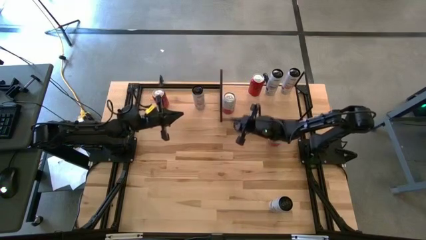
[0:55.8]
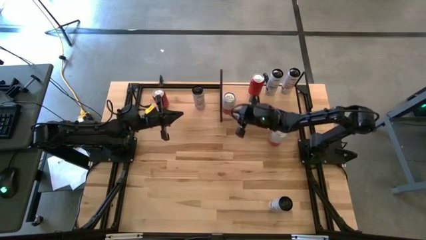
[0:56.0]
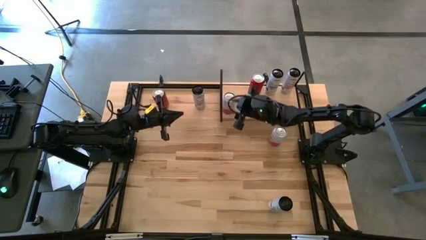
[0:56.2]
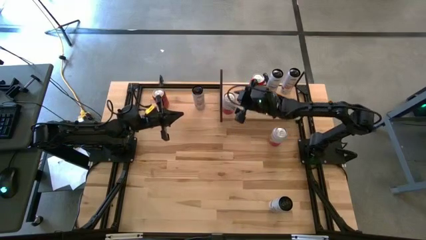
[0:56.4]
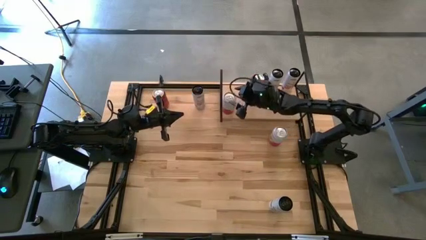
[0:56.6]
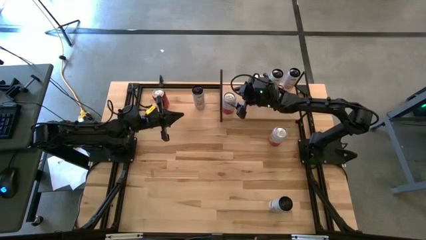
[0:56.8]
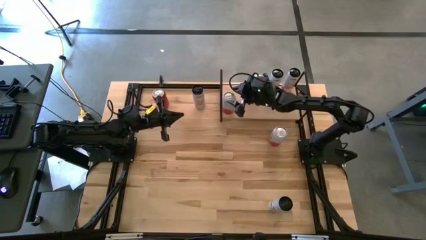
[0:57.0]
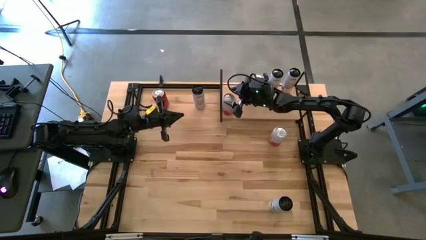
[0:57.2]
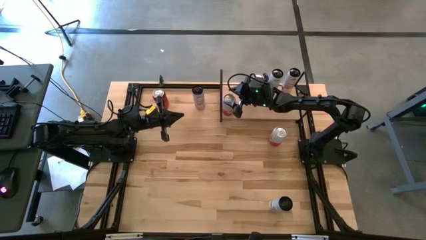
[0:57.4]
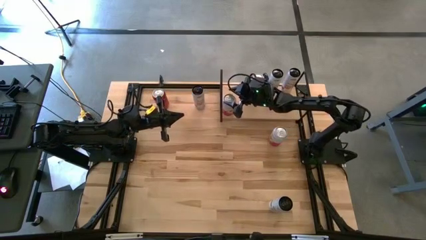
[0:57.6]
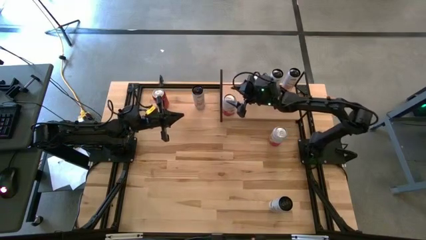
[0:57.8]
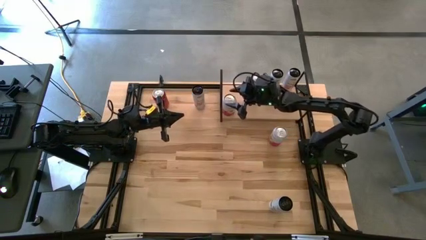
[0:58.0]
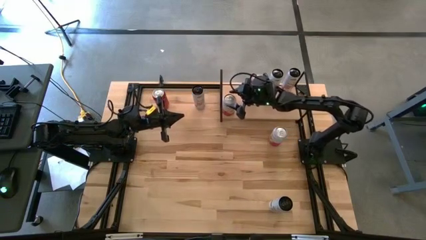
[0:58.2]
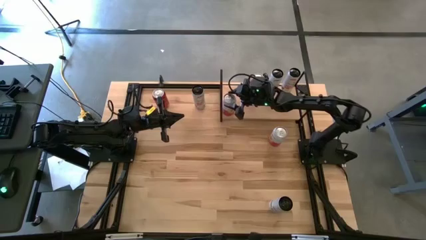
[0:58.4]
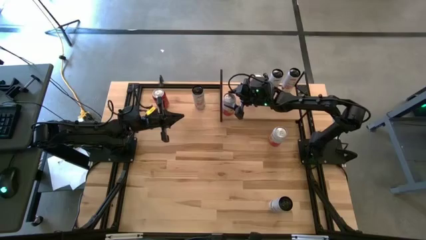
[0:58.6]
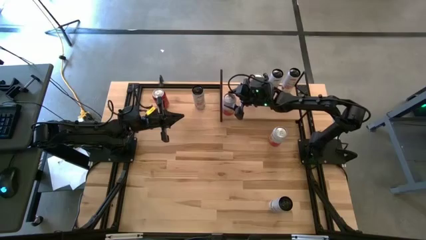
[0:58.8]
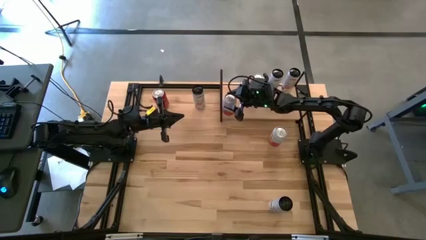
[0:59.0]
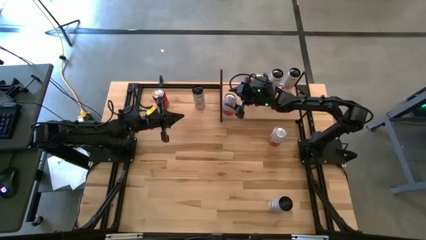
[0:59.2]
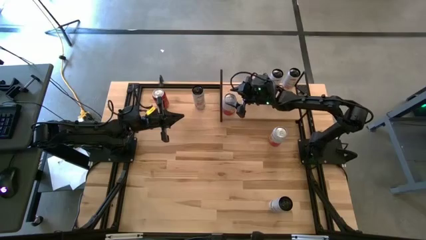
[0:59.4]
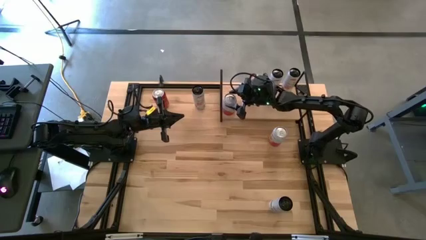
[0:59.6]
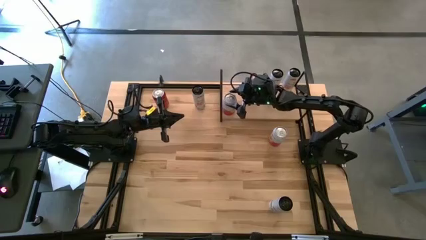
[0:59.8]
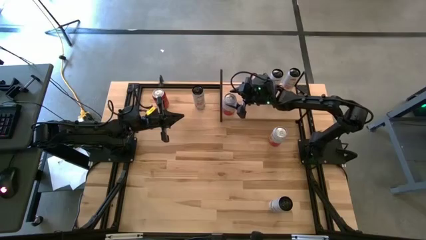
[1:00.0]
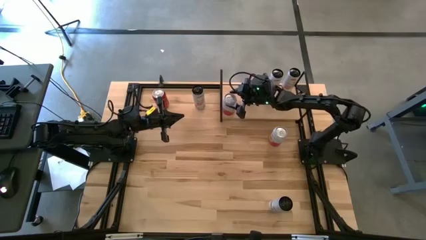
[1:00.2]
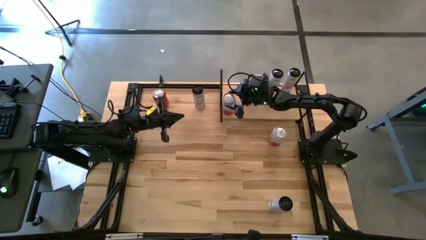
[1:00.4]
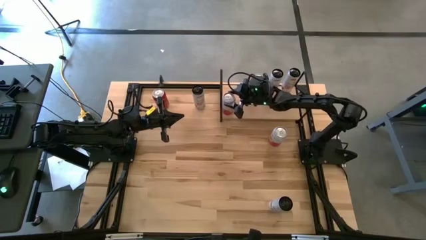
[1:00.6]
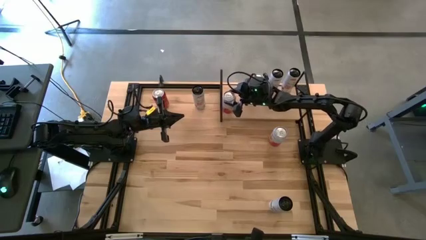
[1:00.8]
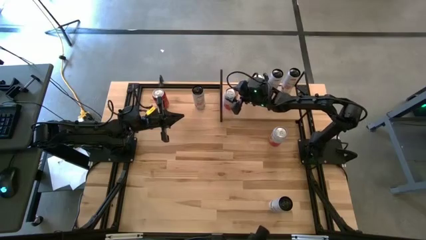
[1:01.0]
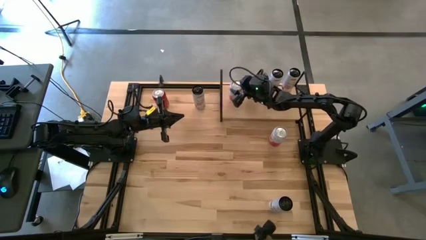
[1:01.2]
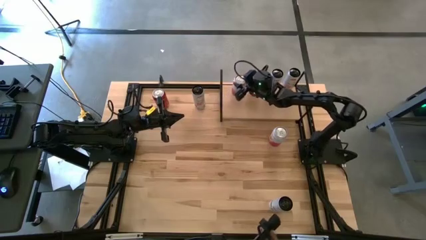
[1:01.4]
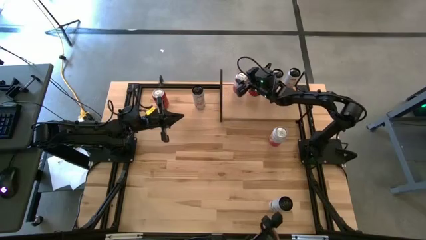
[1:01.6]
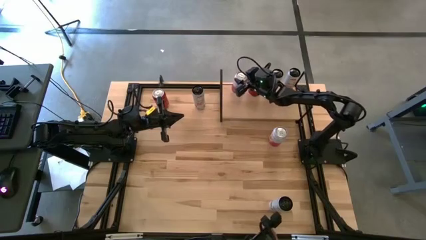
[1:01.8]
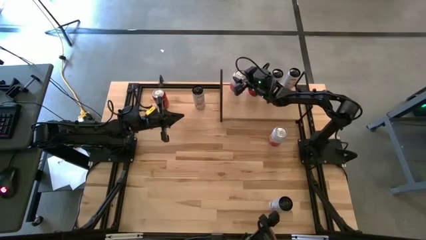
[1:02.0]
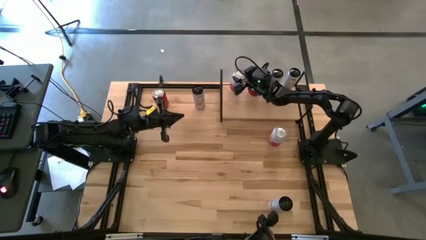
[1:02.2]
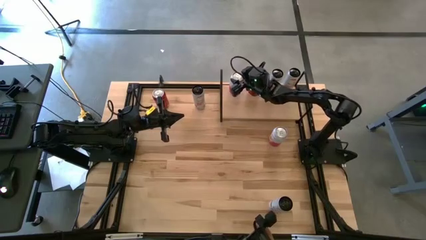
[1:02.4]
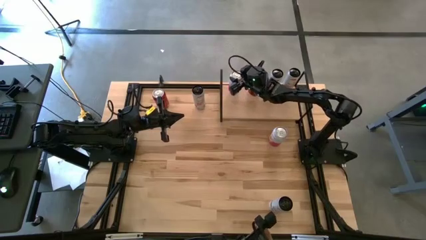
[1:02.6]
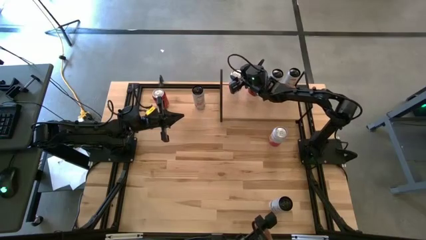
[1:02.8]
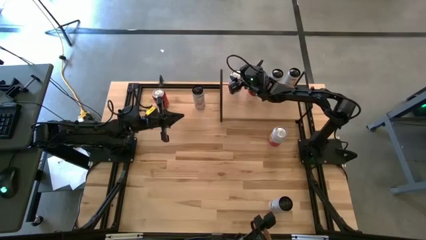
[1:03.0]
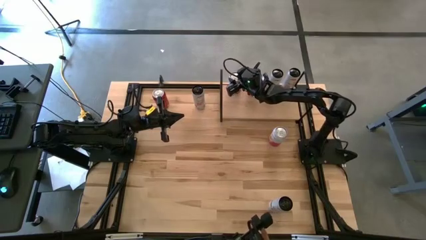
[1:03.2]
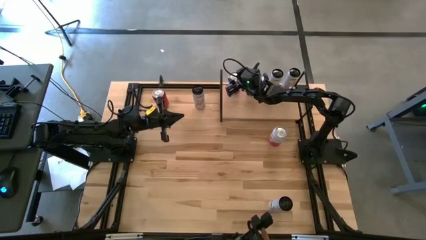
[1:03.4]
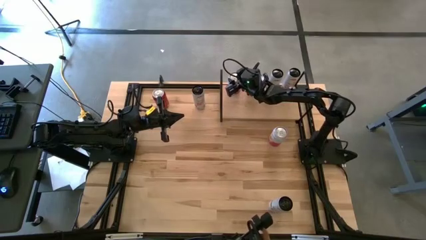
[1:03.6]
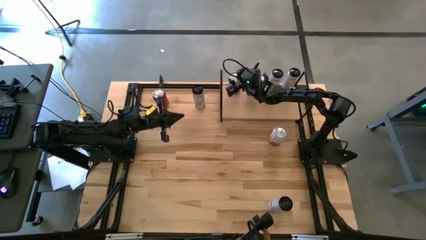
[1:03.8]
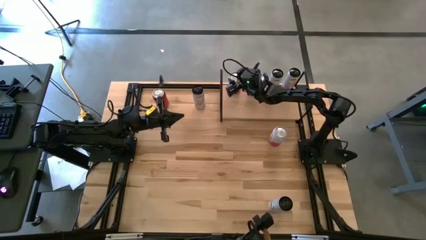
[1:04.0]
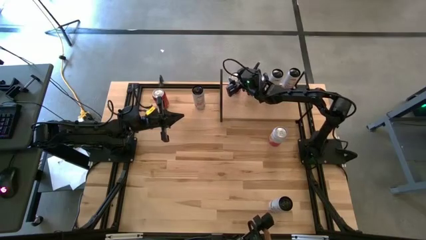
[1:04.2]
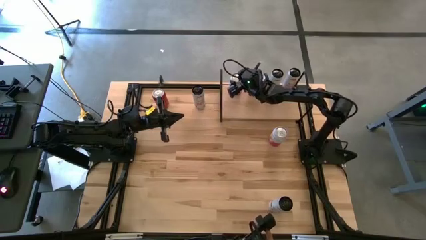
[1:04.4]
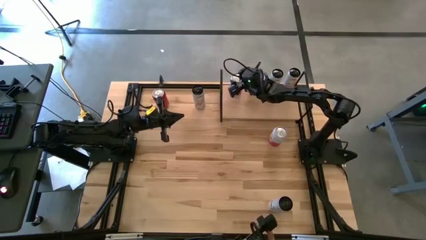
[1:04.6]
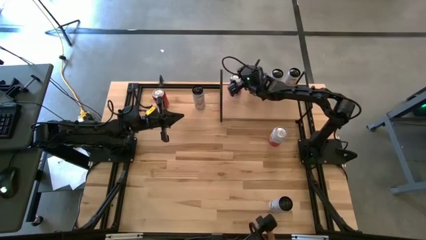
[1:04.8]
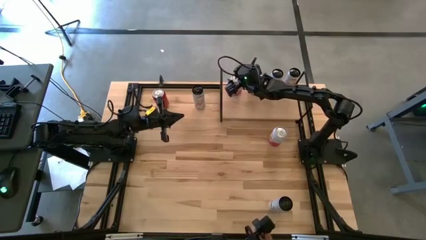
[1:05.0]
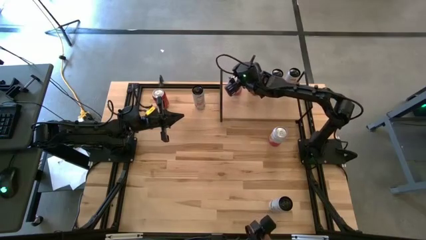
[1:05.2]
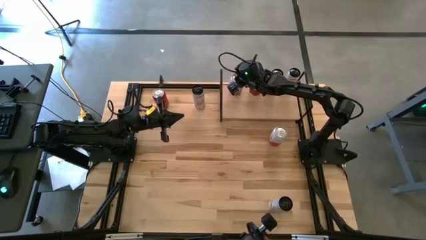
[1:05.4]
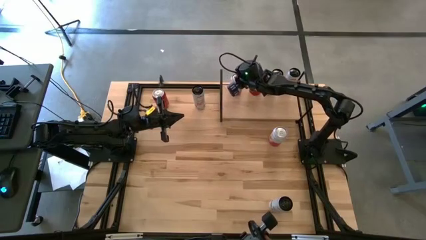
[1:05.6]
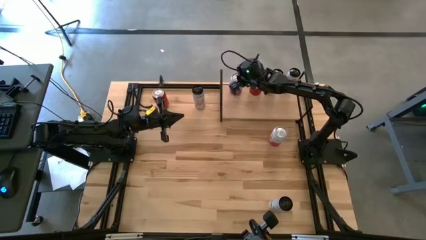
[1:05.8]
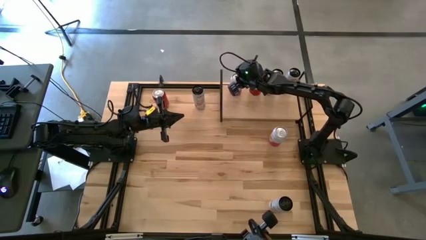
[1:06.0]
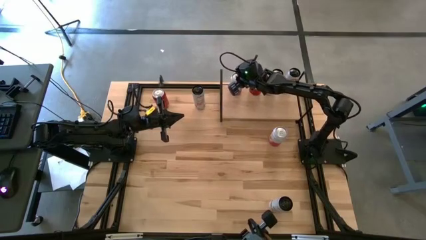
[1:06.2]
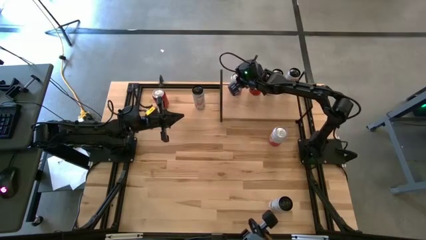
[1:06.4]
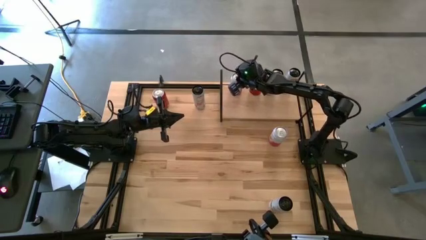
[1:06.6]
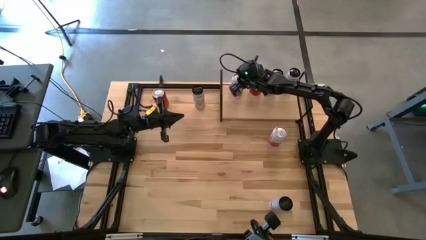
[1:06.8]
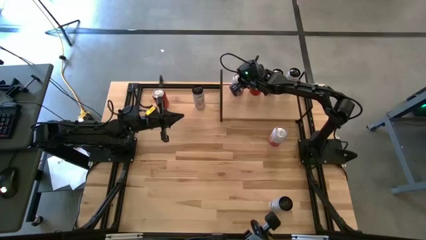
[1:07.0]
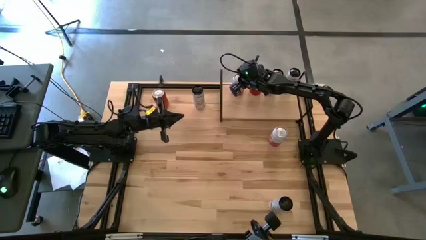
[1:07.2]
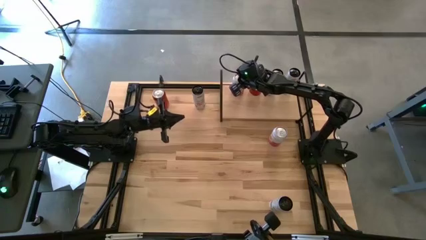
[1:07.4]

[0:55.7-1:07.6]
Task: Place canned beverage on shelf
Put the left white and orange soda can on the shelf

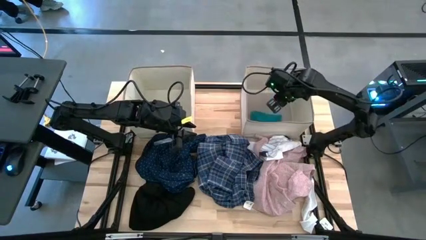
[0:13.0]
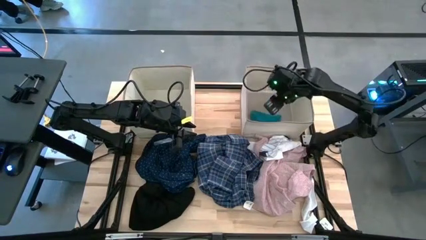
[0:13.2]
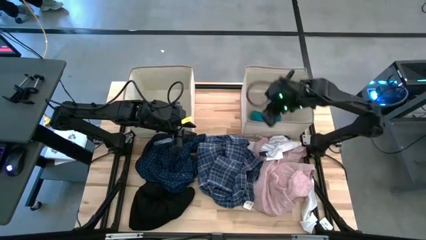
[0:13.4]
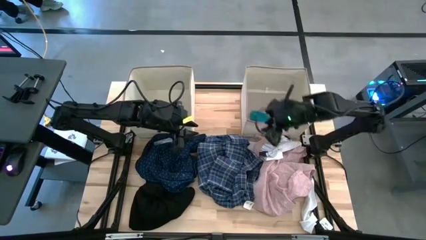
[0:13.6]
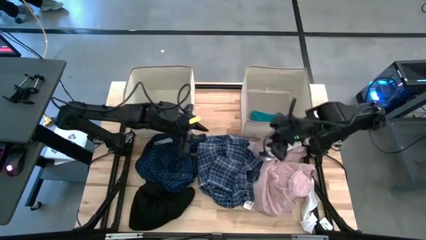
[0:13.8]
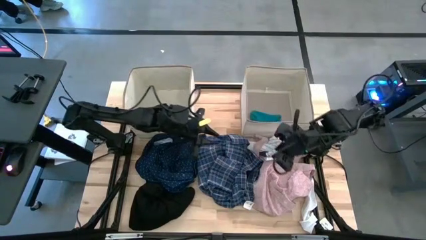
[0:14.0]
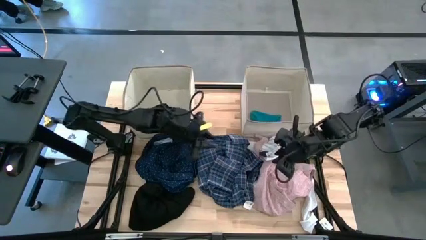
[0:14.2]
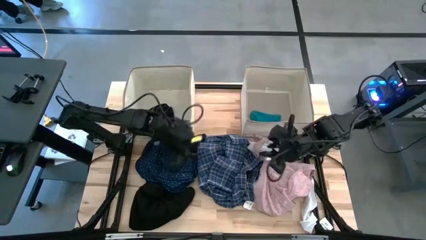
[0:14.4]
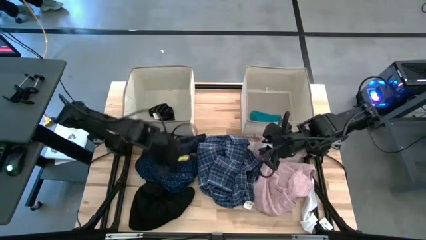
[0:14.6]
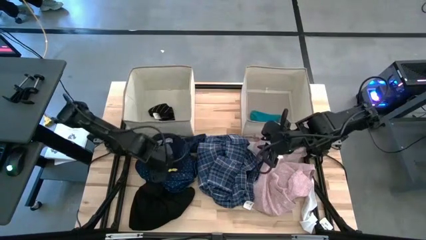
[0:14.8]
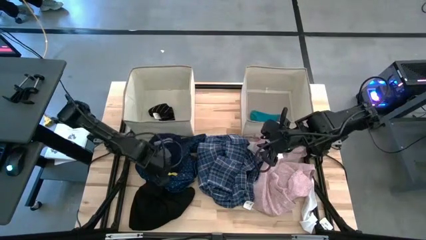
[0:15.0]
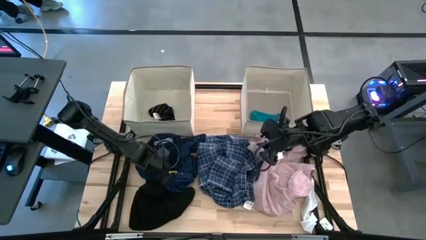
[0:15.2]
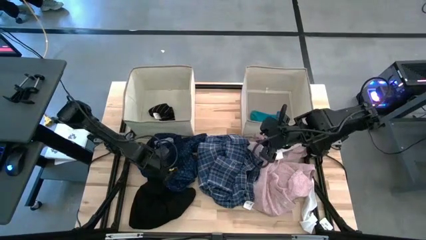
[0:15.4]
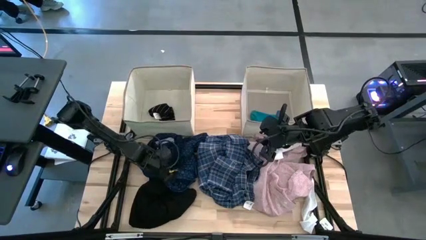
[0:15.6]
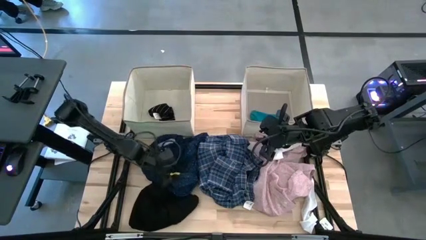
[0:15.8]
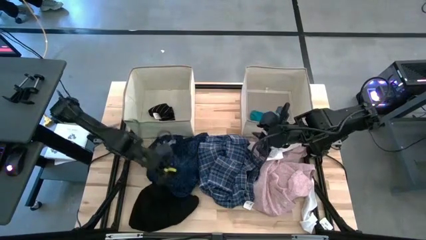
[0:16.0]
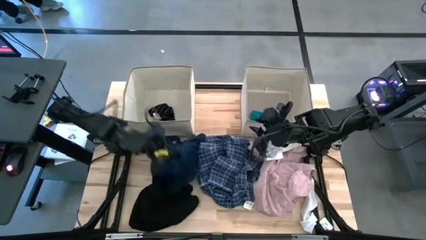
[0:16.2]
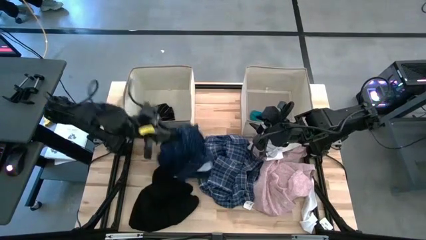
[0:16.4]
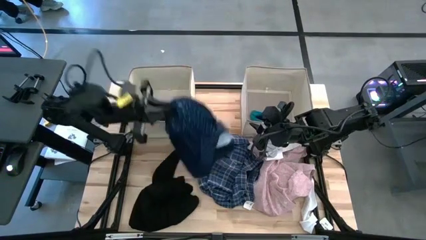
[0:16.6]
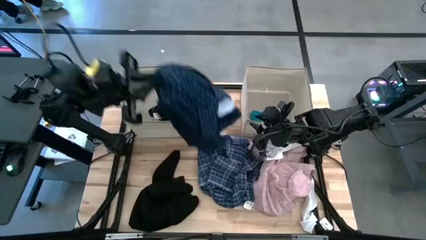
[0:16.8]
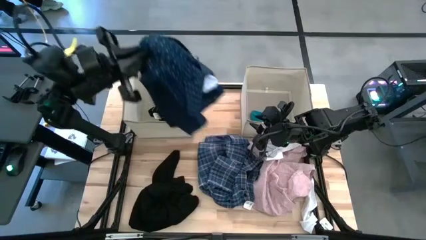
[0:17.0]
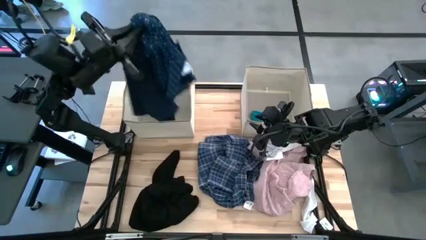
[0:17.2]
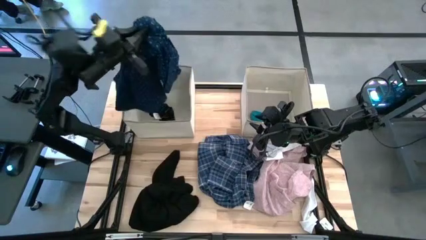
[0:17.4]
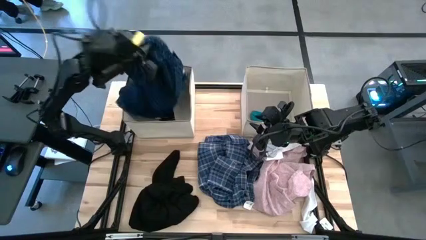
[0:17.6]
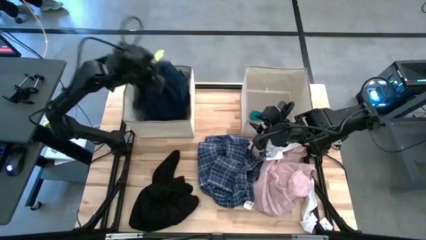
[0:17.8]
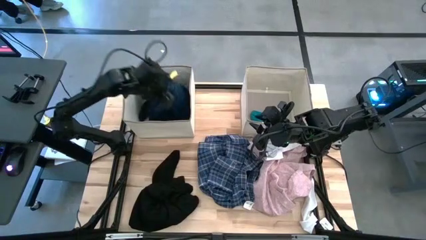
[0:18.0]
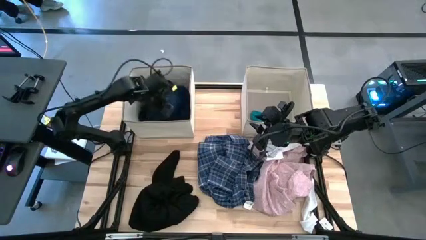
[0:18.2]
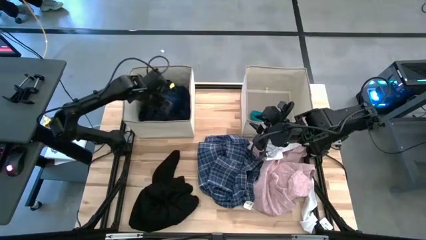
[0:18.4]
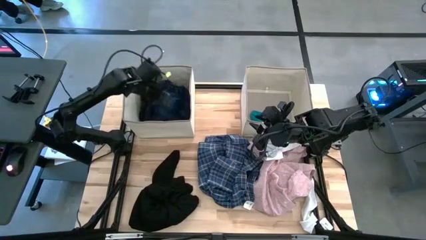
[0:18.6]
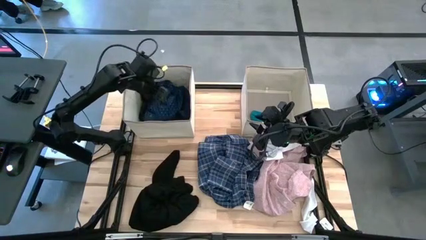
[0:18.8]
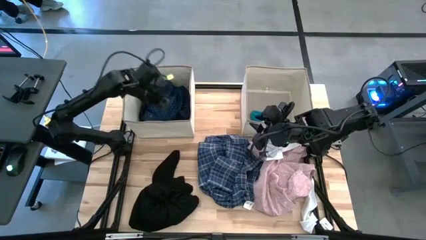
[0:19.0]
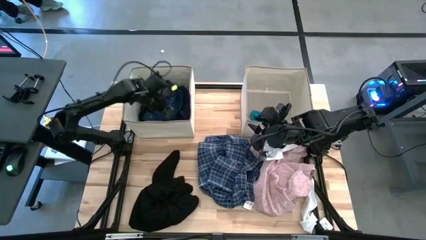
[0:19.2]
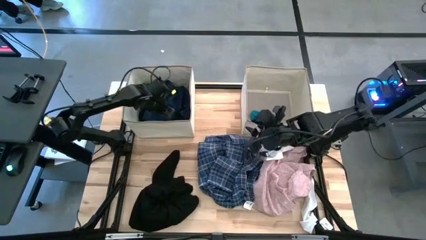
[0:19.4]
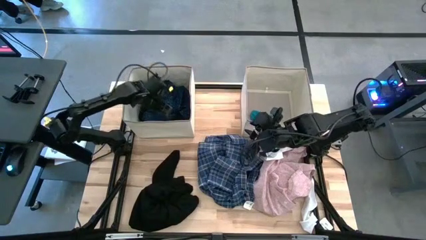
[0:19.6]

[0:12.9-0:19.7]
Task: Sort clothes
Put the blue polo into the left laundry bin
